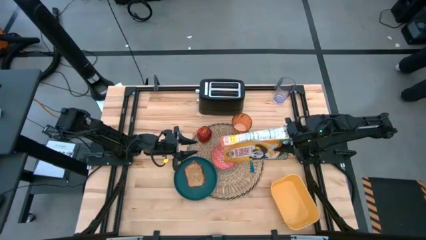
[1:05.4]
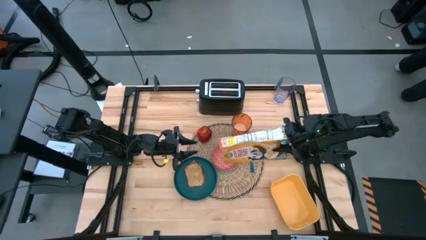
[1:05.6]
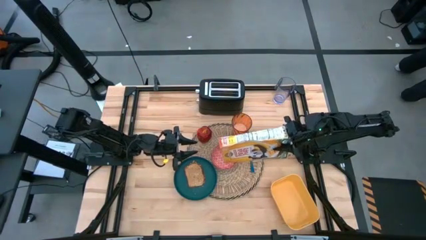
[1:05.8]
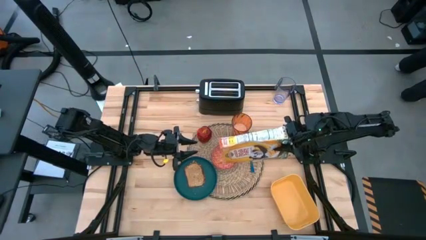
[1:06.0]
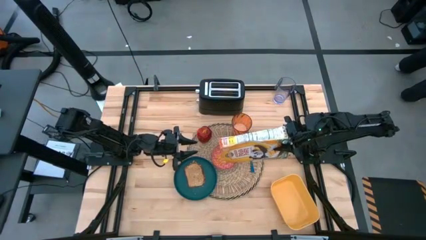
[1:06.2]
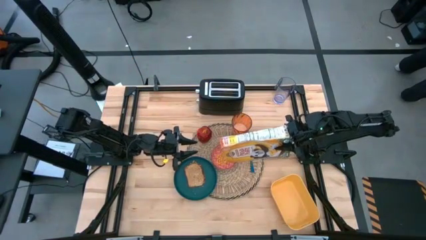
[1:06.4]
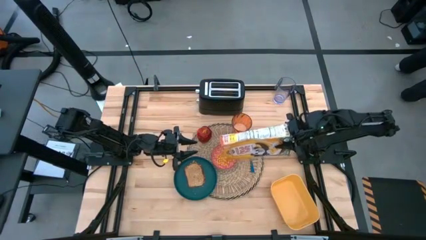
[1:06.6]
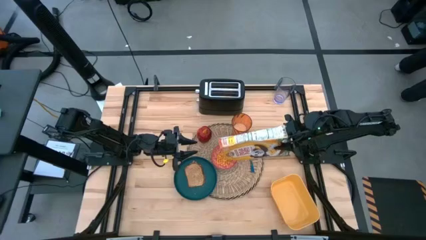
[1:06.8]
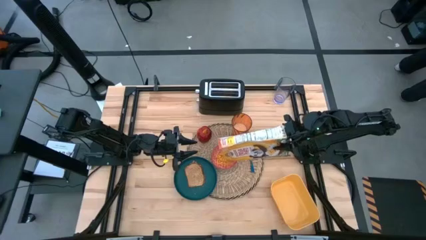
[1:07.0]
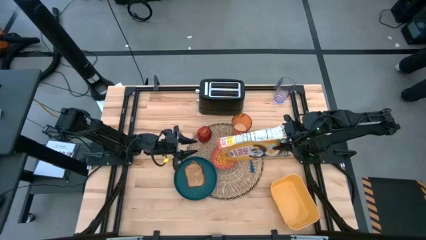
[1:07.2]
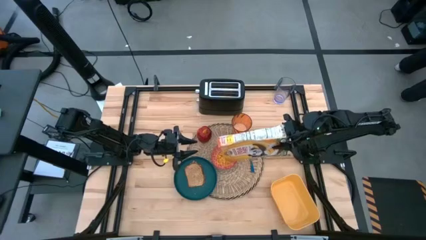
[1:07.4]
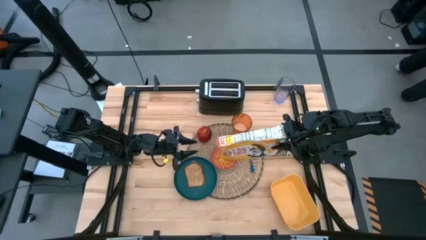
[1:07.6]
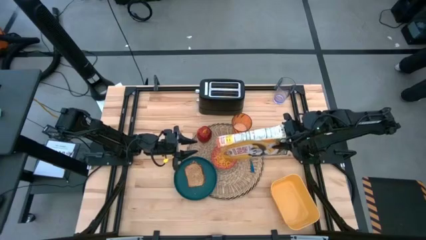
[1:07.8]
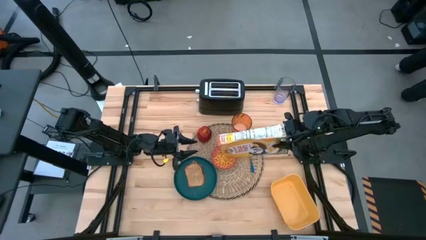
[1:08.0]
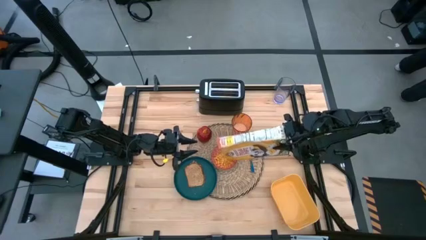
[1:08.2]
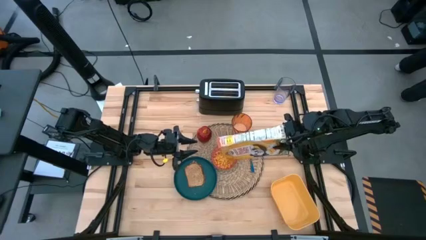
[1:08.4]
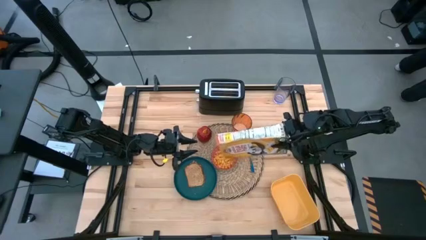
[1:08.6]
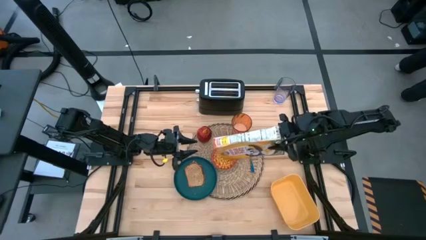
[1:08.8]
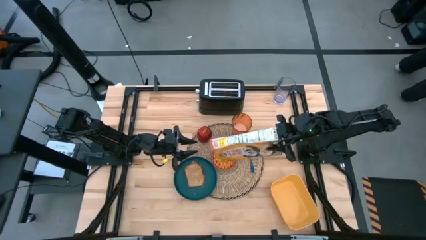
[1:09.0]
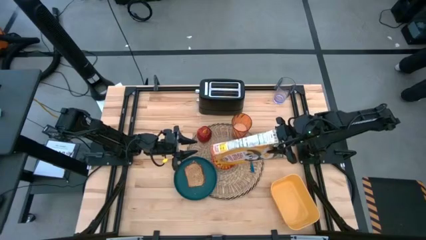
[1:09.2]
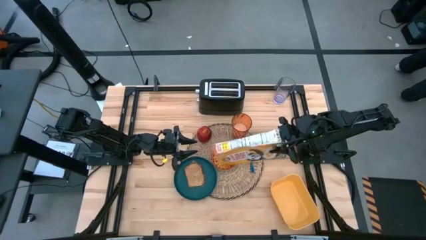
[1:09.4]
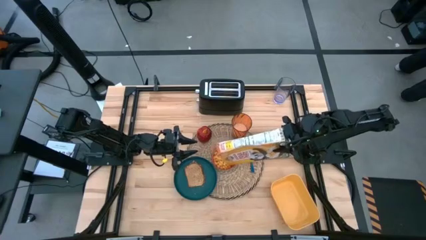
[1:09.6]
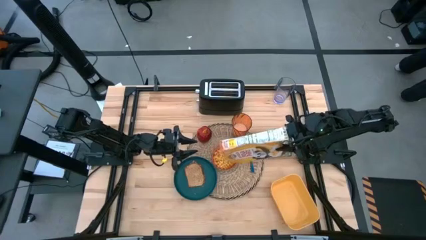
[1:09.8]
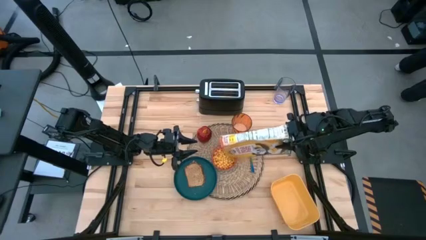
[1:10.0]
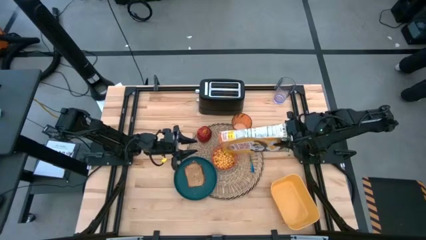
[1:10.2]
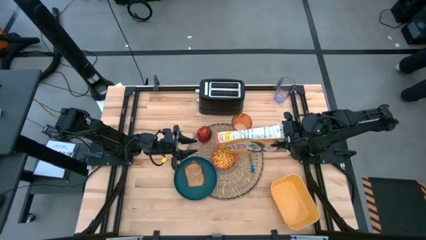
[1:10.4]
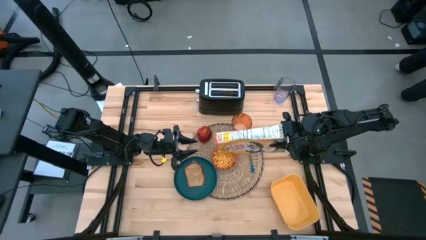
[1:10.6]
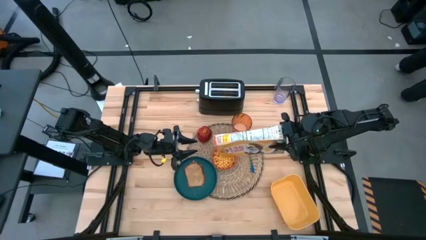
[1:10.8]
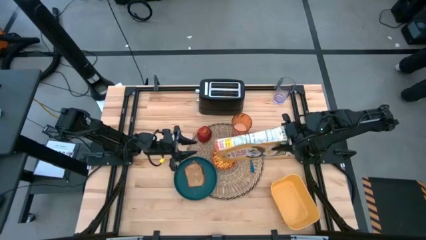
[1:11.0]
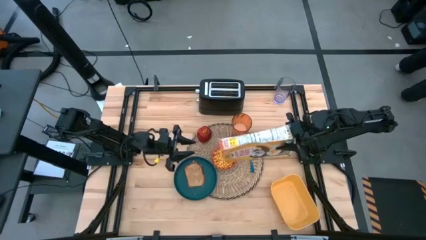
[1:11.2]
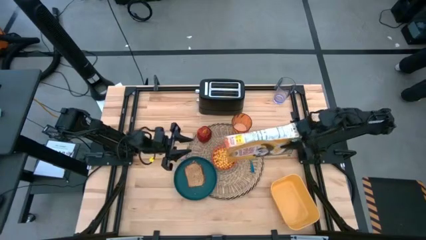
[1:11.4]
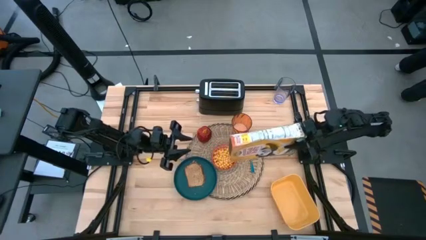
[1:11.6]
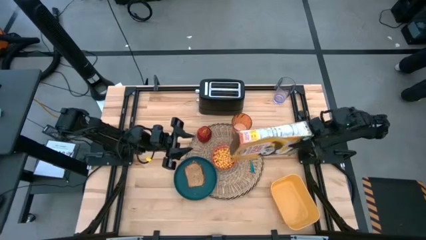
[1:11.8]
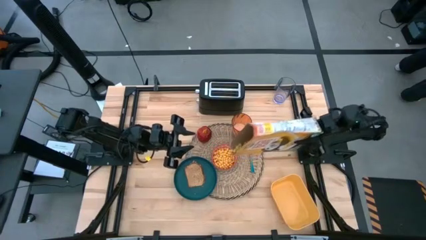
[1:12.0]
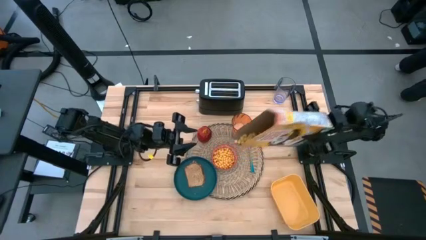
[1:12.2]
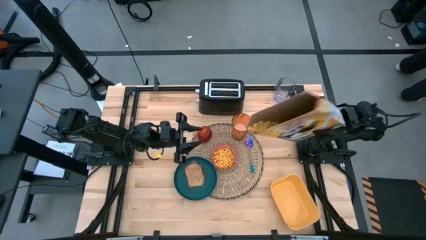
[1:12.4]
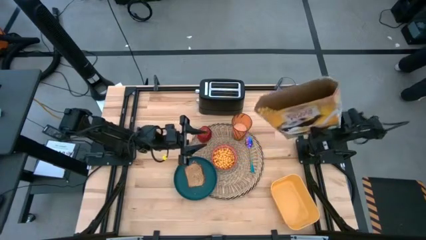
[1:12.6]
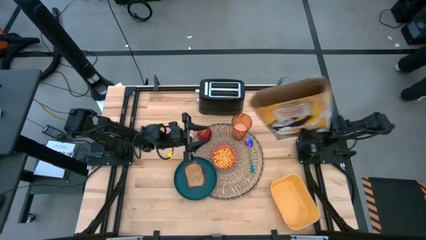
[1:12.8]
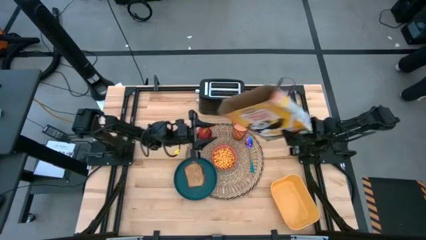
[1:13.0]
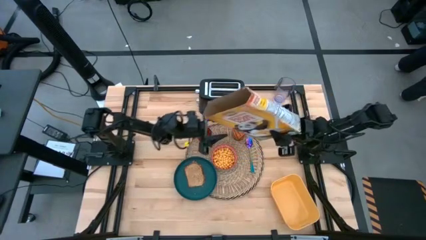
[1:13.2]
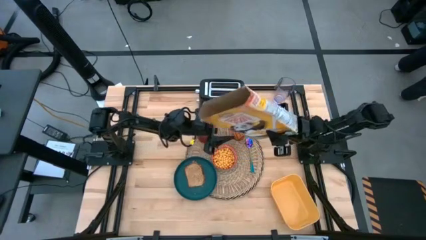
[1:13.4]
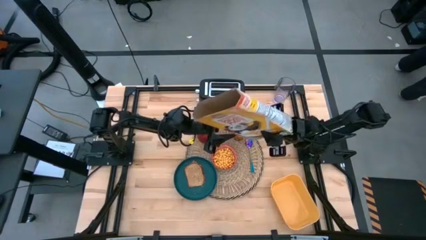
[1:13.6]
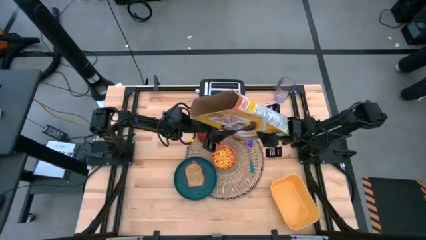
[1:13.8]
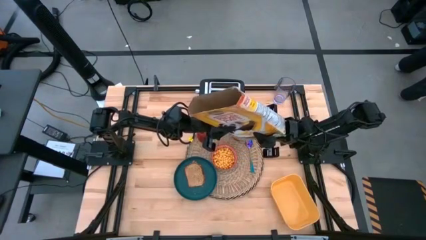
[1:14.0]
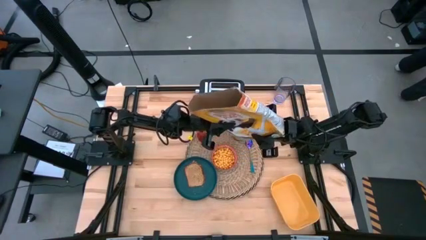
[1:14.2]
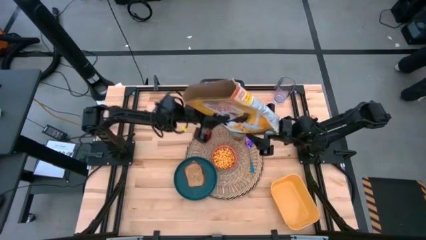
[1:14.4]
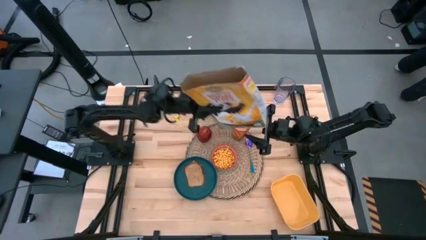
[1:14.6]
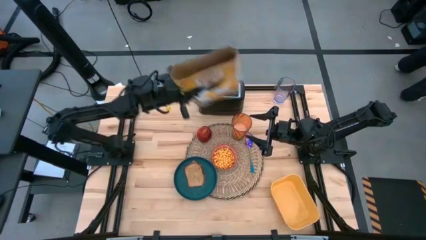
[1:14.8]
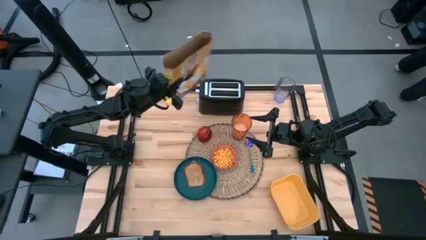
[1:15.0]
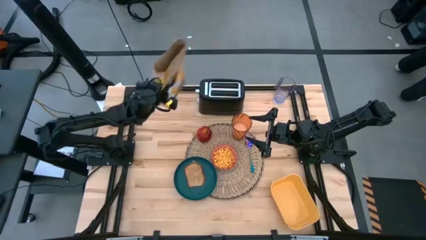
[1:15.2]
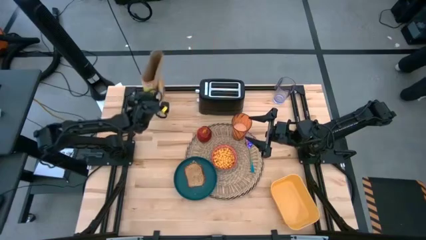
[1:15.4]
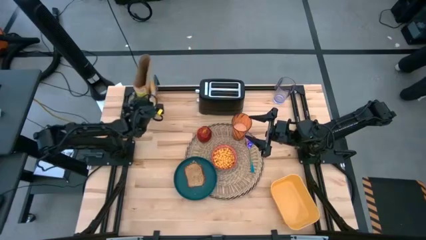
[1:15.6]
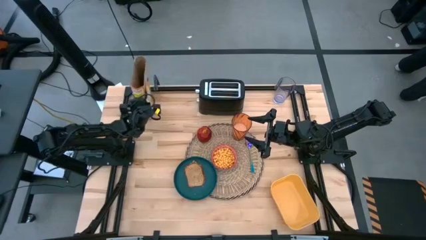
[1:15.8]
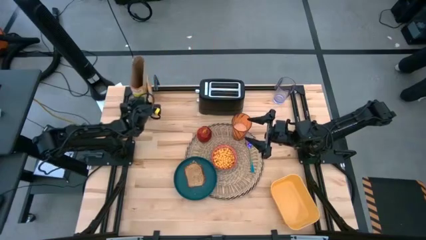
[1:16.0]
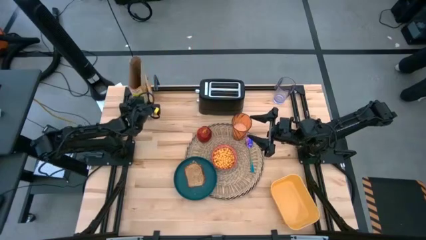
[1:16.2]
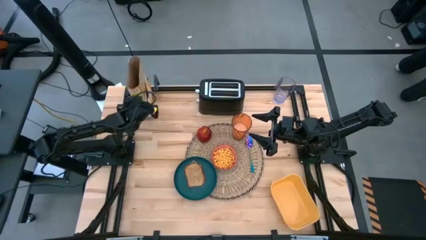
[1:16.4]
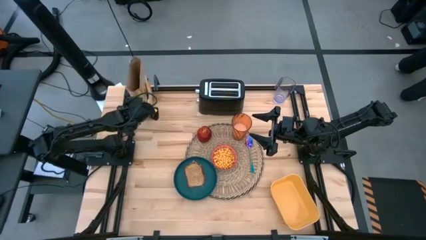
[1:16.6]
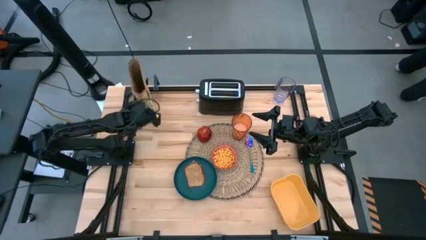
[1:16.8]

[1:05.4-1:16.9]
Task: Arrange a breakfast setting
Pour the cereal from the yellow cereal box into the red bowl

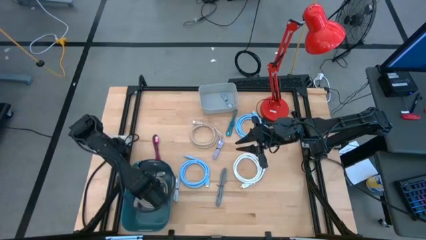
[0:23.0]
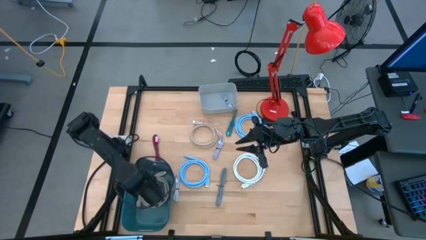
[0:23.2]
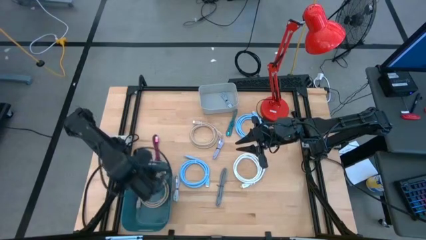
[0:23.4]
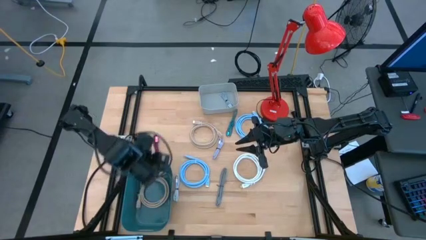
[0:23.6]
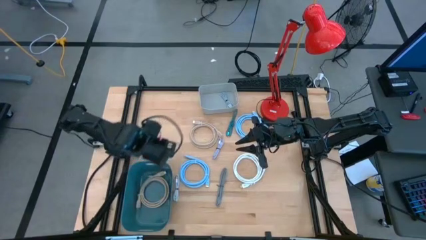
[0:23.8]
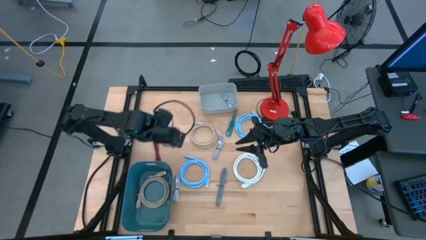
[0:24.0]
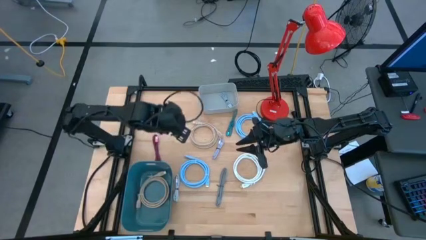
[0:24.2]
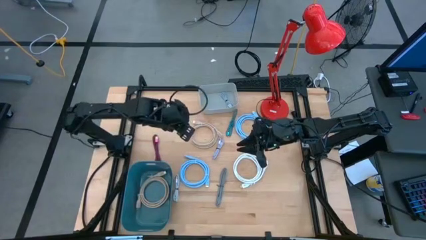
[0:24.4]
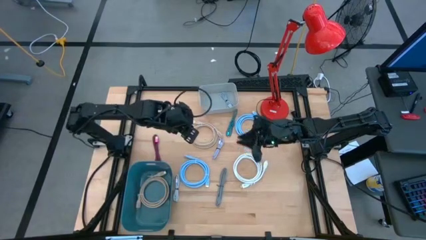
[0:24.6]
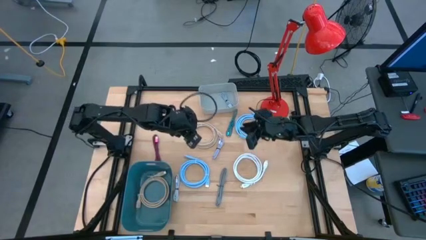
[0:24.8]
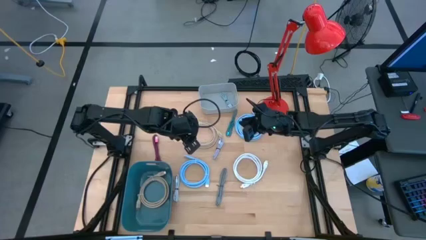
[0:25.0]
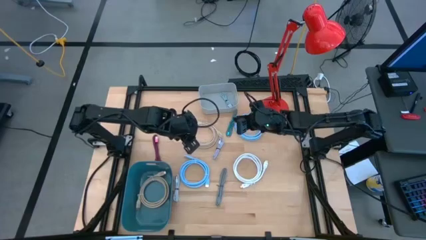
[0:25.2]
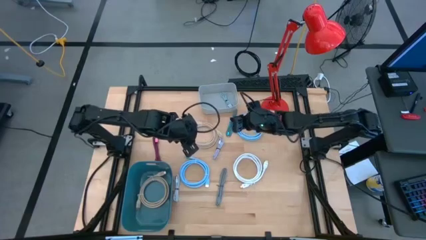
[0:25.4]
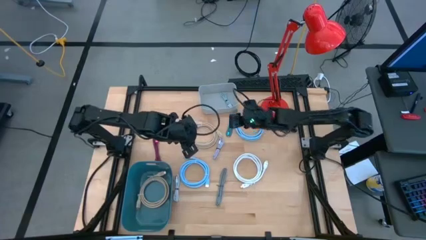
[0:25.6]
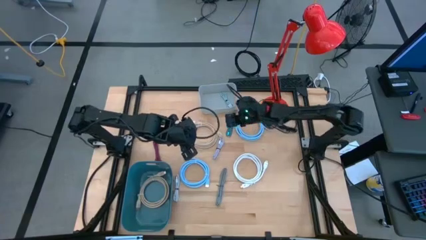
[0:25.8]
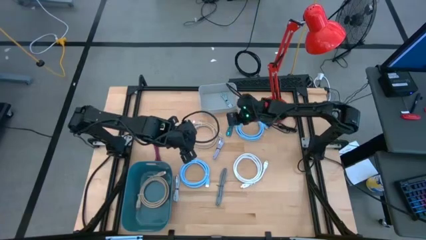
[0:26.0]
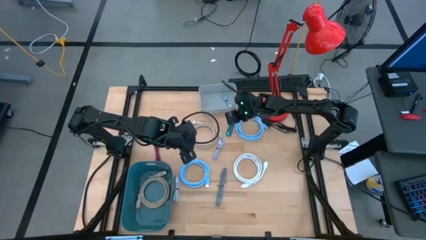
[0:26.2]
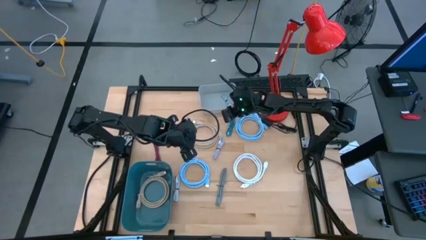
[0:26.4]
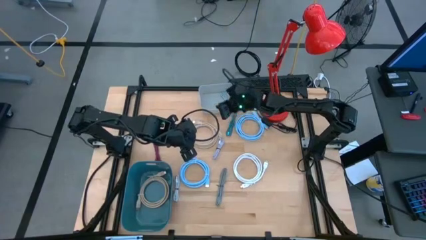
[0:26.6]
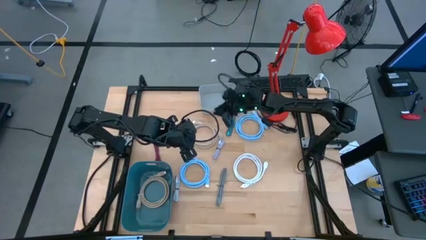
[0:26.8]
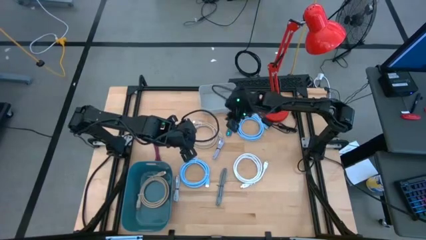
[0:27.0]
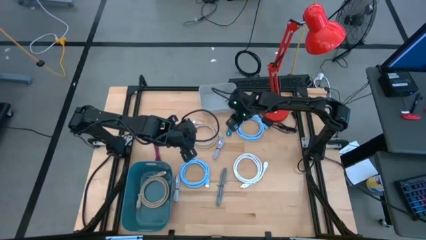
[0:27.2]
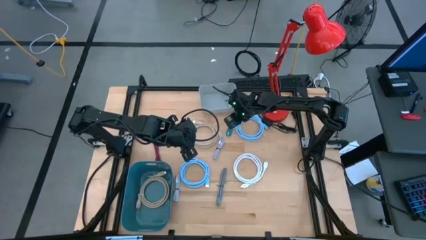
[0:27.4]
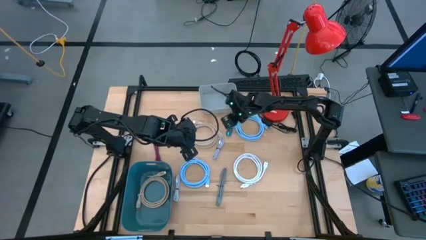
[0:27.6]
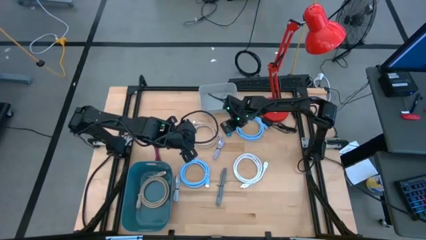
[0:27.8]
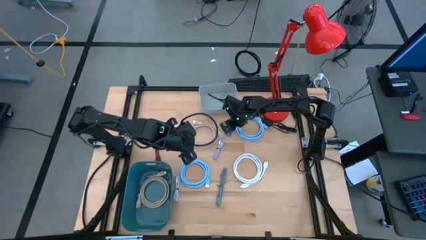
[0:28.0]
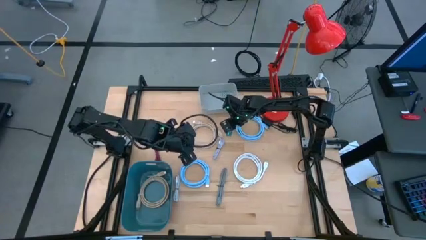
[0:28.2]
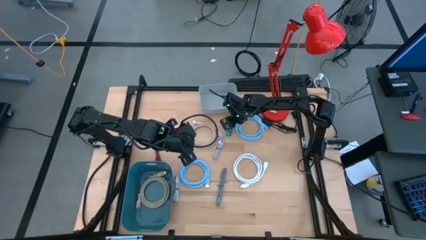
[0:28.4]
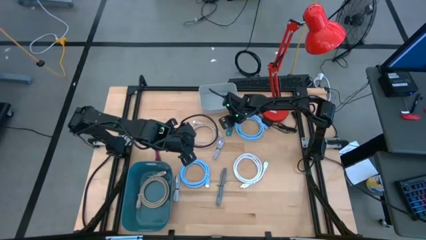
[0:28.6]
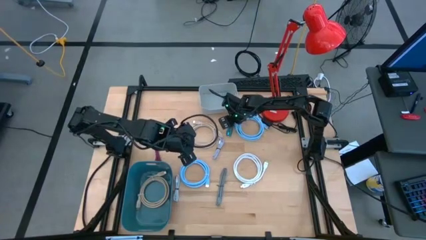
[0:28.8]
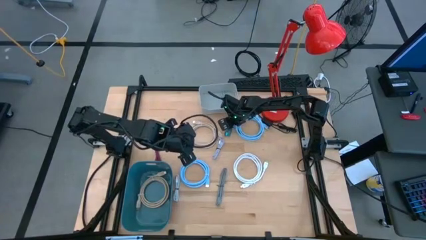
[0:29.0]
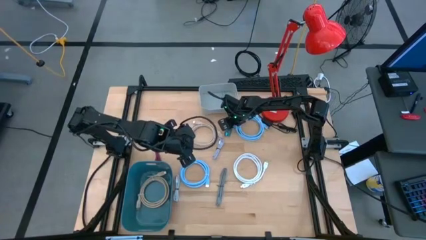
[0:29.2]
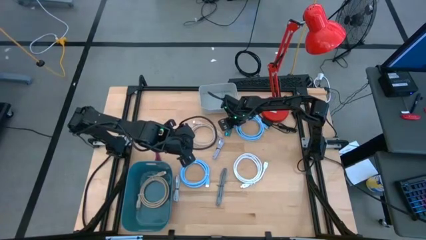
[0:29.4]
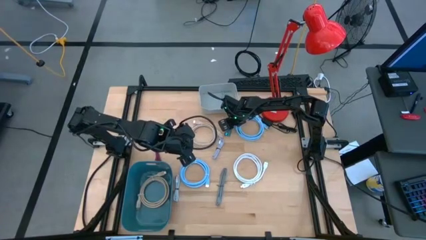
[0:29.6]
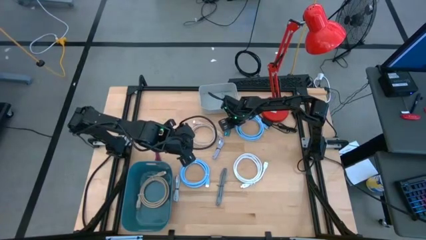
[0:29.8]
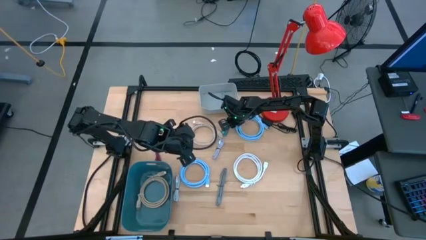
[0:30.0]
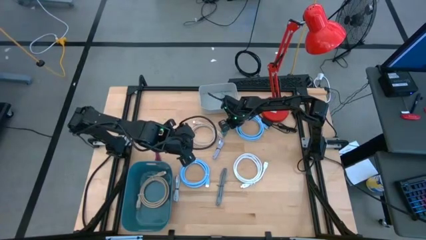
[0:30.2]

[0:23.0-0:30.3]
Task: Pick & Place USB Port
Put the black blue charger cable into the gray bin
